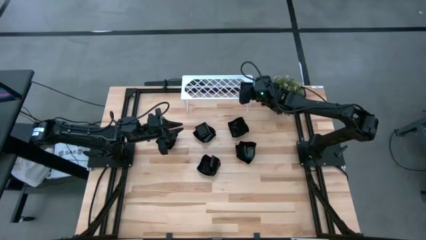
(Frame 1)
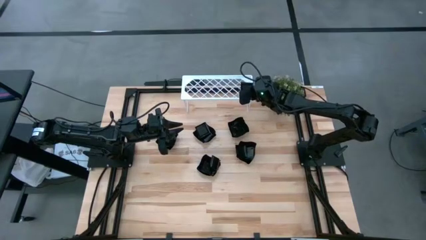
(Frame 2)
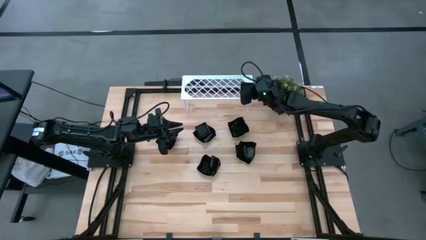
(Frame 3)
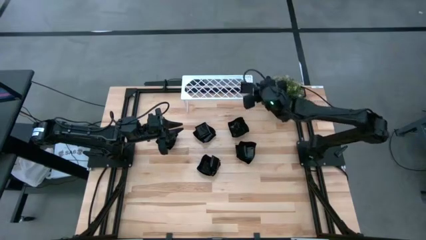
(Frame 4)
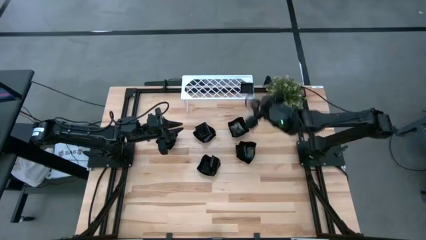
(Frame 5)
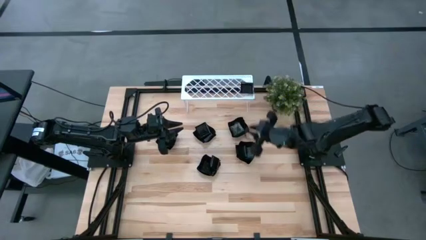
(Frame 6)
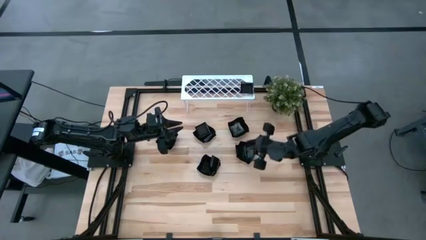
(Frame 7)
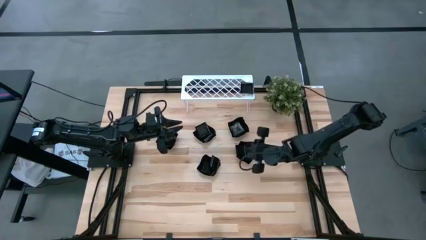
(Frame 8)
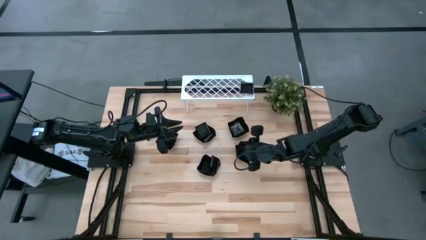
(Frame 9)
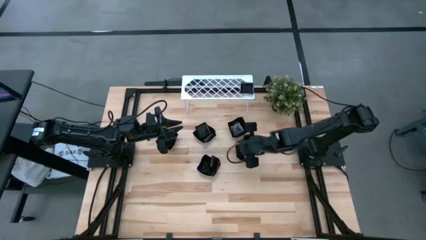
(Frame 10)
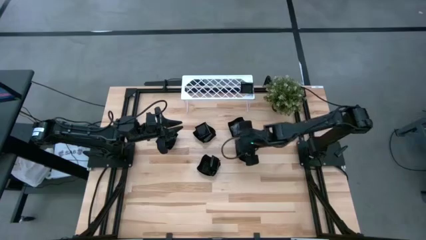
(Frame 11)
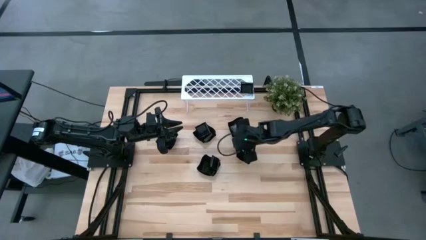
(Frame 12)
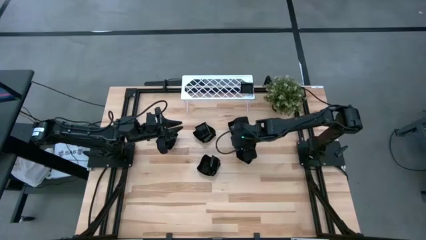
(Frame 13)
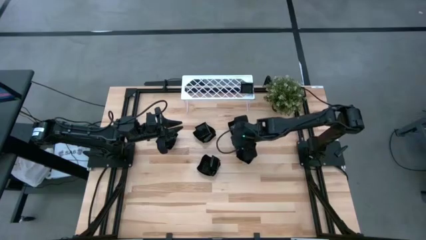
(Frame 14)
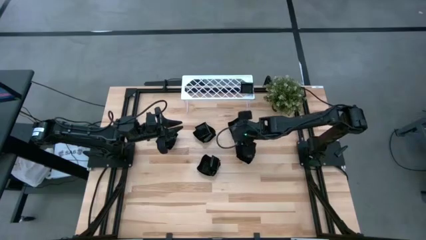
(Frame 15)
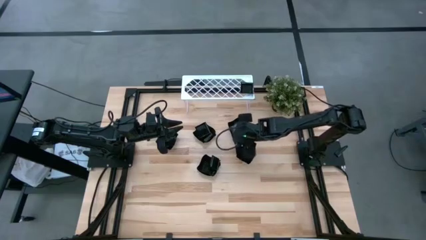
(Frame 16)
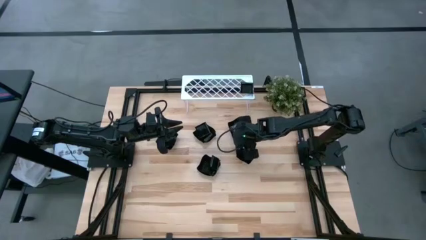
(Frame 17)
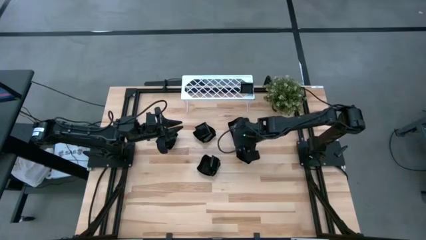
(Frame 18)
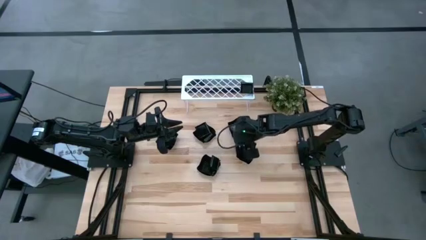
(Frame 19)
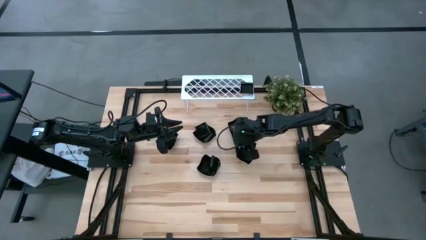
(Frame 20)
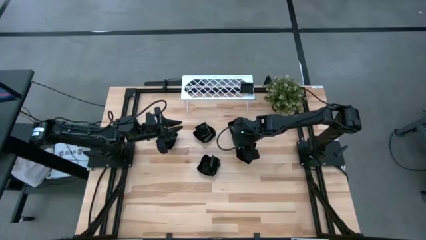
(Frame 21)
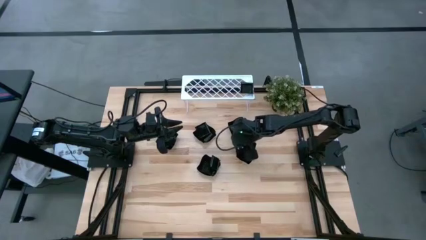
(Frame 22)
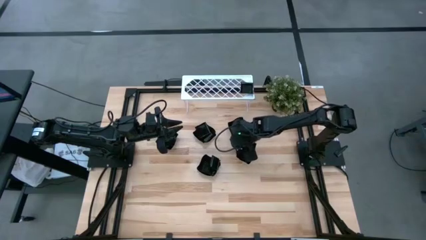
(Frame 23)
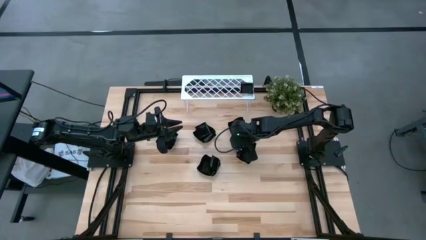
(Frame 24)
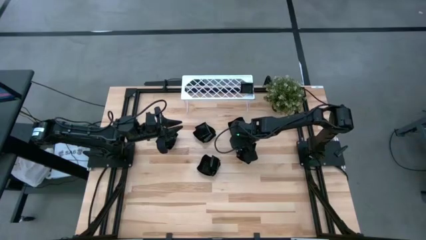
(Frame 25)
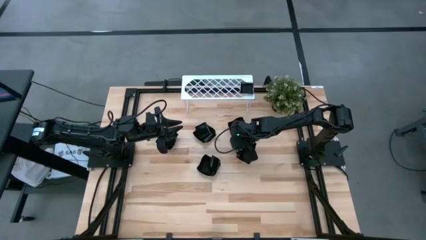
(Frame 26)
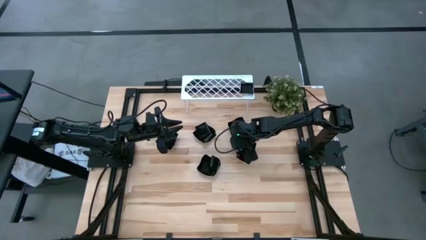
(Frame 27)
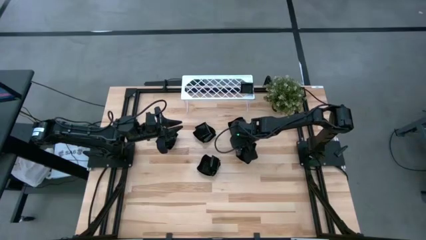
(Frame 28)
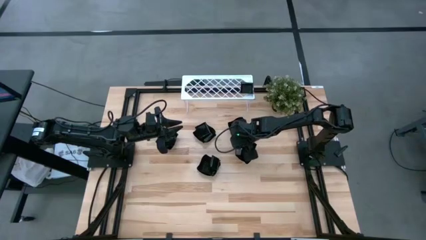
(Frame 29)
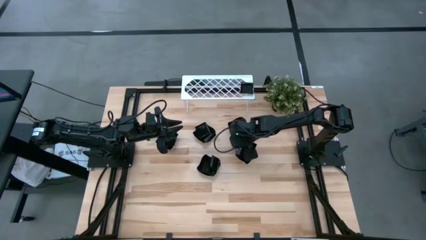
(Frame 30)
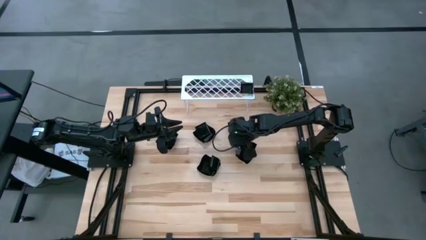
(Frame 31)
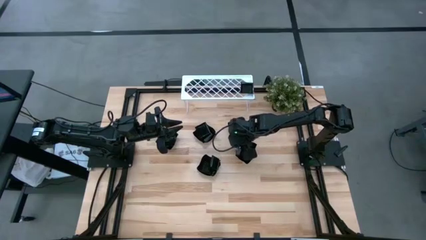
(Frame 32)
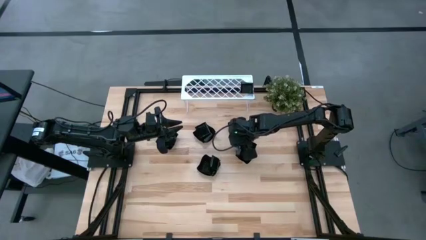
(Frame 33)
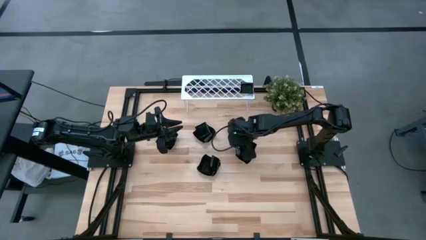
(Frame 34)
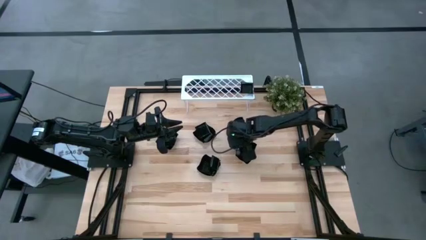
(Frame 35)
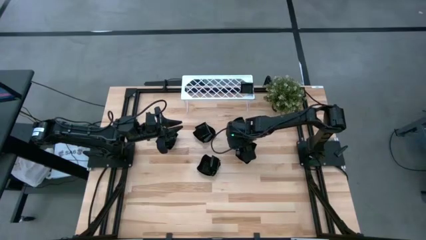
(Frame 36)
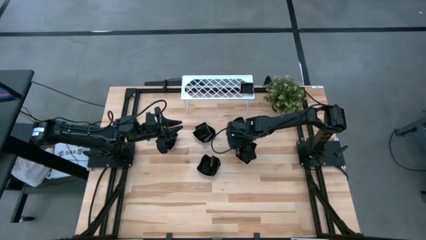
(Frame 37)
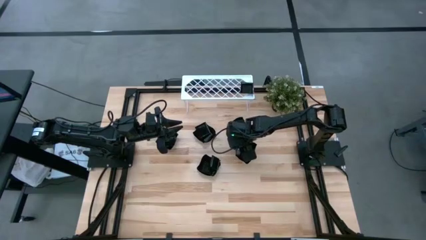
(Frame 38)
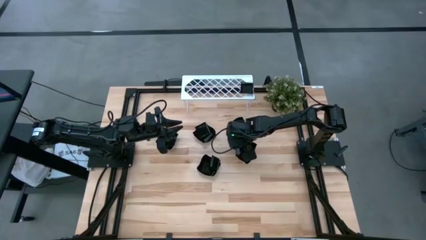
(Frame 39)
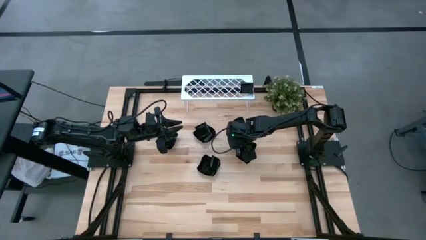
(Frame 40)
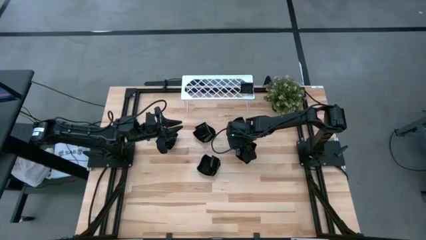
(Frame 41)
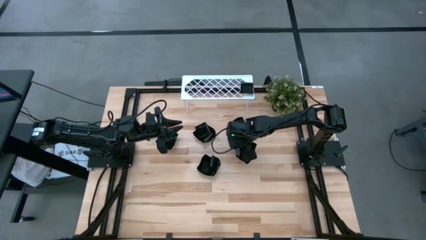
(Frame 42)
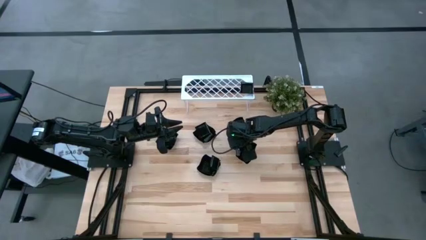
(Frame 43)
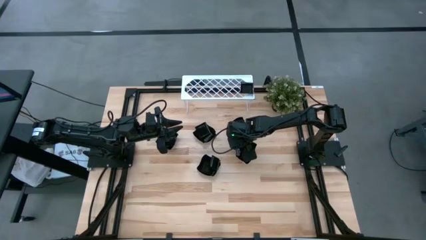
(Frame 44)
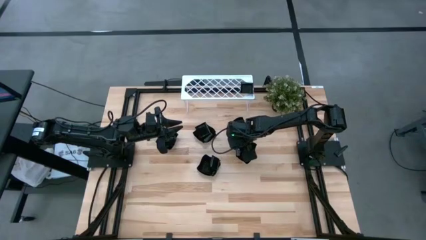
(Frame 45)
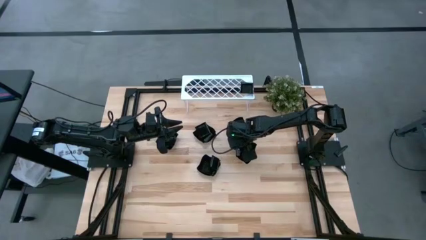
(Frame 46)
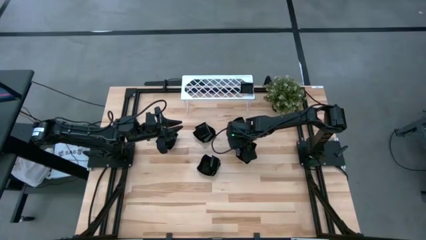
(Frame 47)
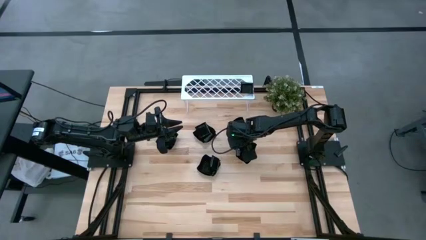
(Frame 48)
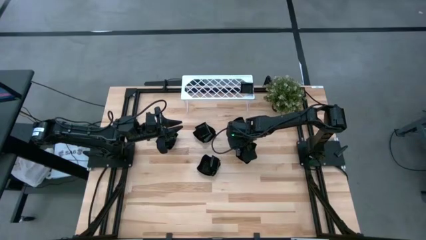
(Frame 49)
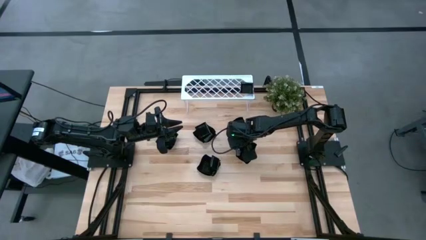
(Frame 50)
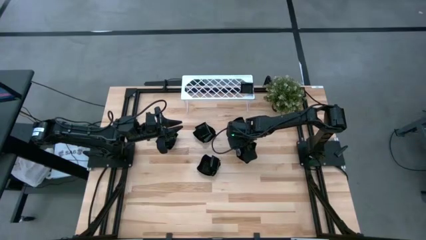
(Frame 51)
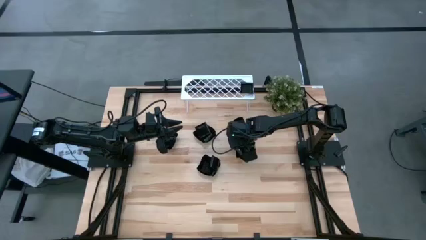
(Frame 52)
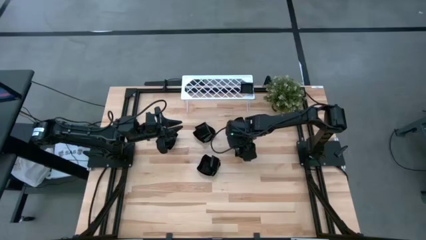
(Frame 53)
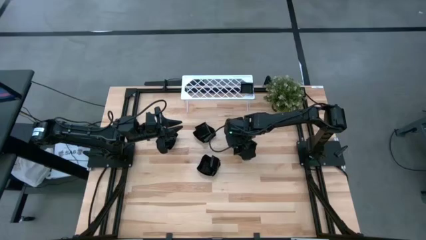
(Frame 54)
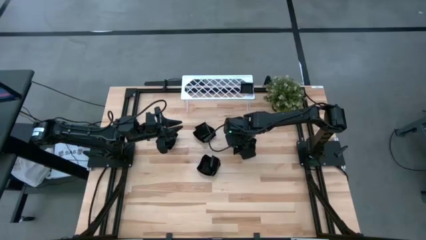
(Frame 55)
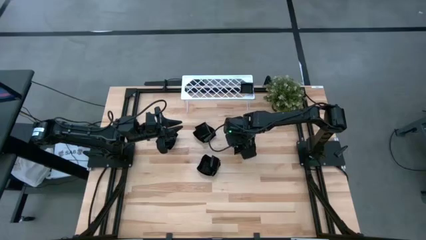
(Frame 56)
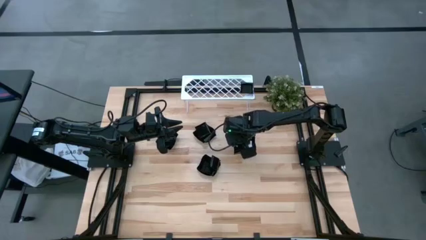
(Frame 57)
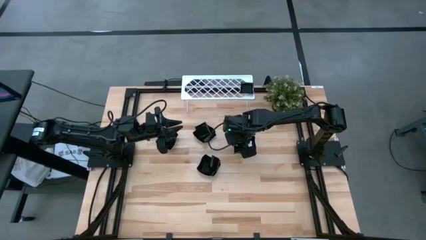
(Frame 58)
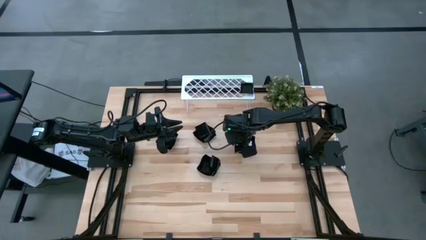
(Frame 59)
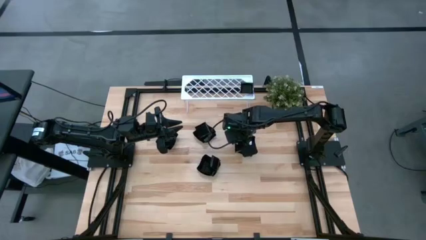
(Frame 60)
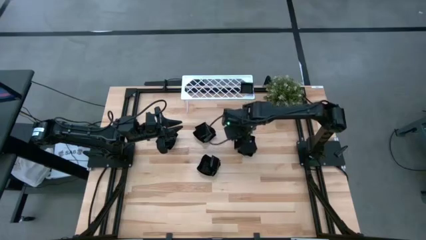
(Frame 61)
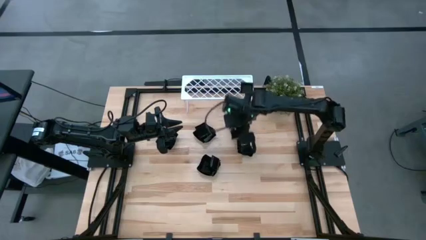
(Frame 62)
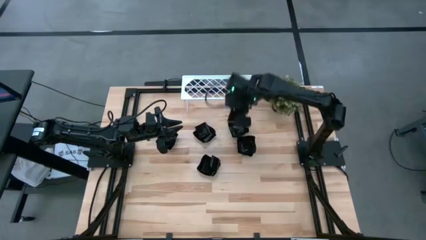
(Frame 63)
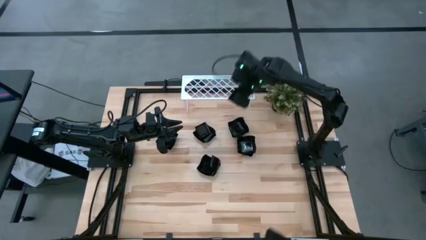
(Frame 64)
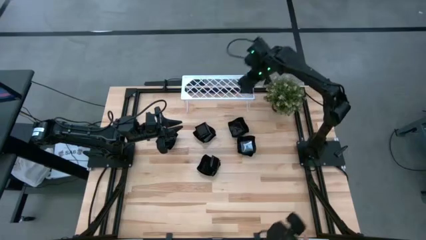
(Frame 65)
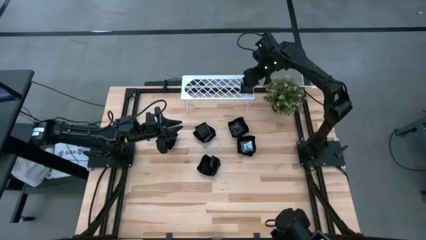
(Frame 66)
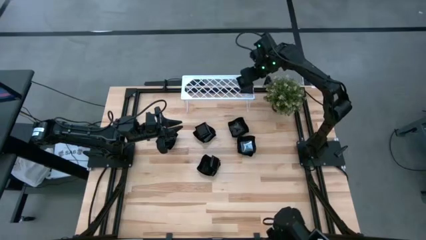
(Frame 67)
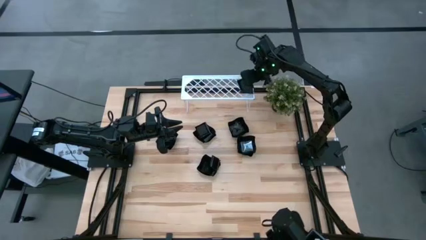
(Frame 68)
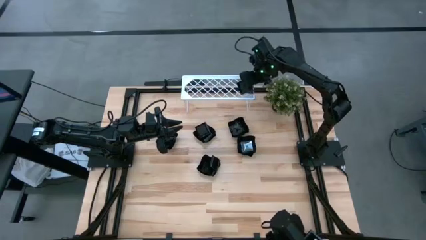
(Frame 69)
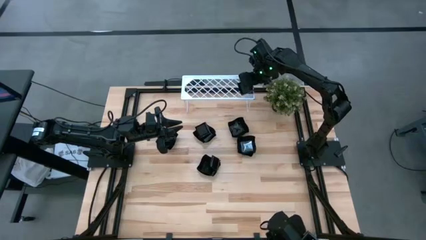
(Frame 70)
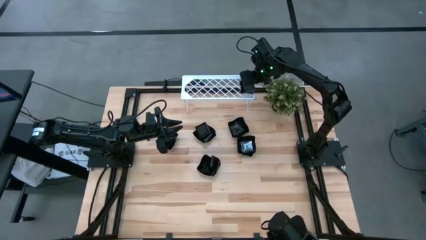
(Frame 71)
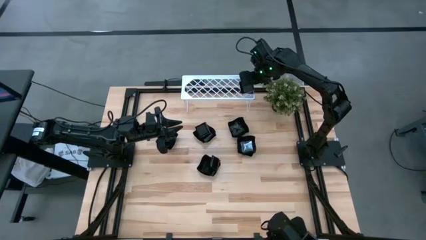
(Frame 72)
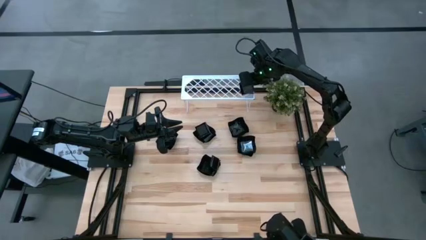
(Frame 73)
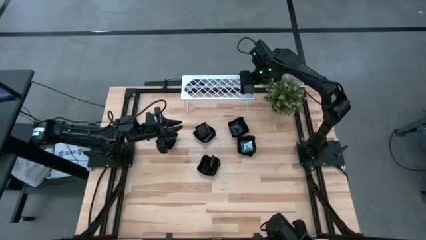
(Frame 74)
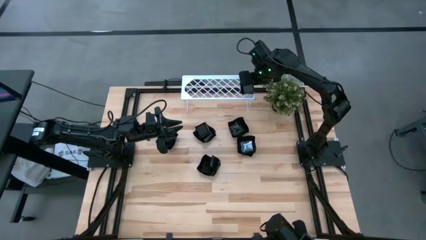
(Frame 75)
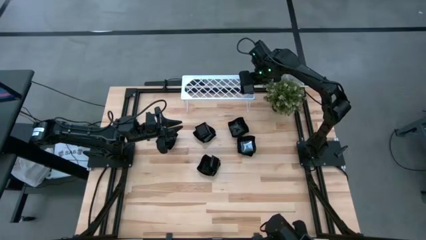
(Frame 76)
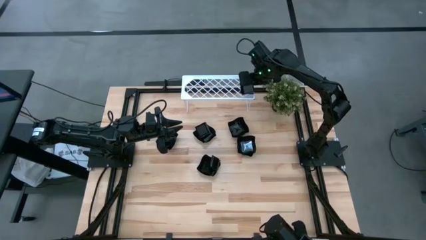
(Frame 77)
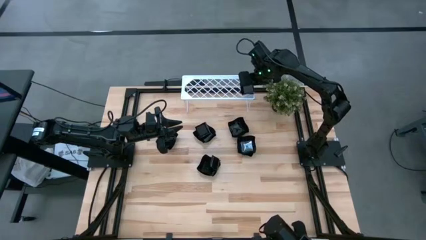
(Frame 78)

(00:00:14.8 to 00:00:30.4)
Task: Pick & Place Mini shaped plates
Stack the black square plate on top of the black square plate on the shelf
